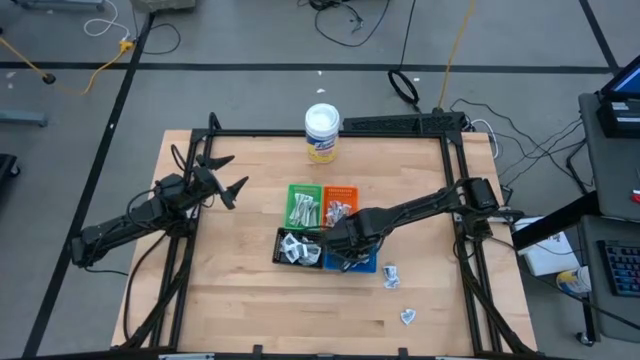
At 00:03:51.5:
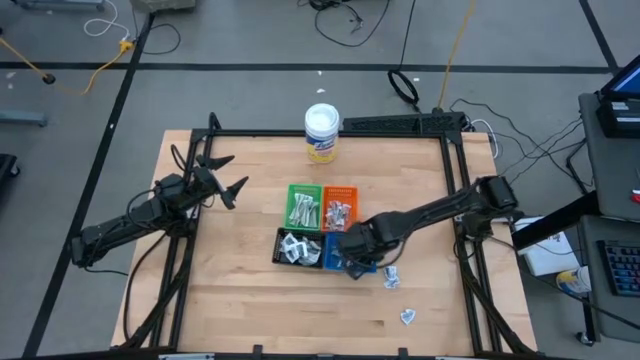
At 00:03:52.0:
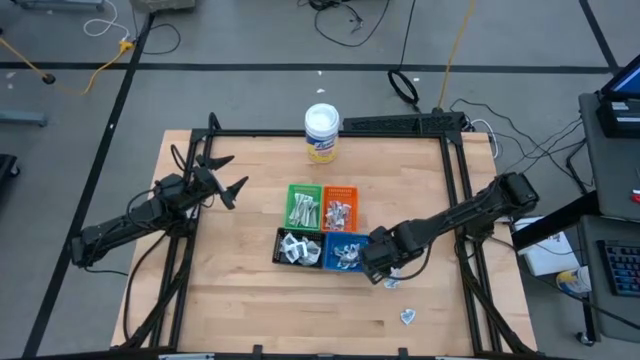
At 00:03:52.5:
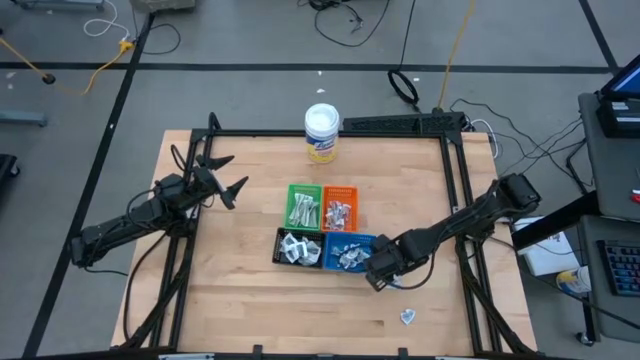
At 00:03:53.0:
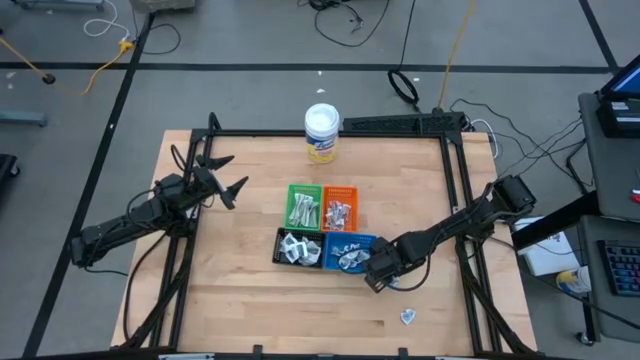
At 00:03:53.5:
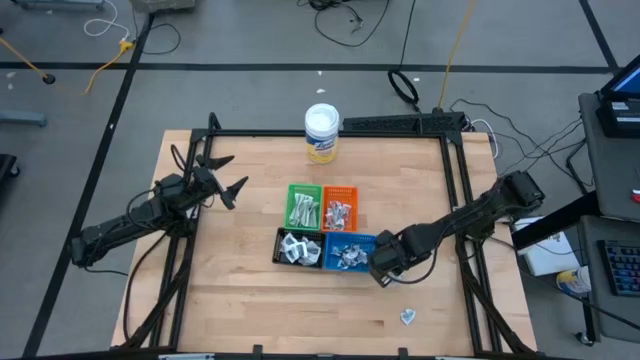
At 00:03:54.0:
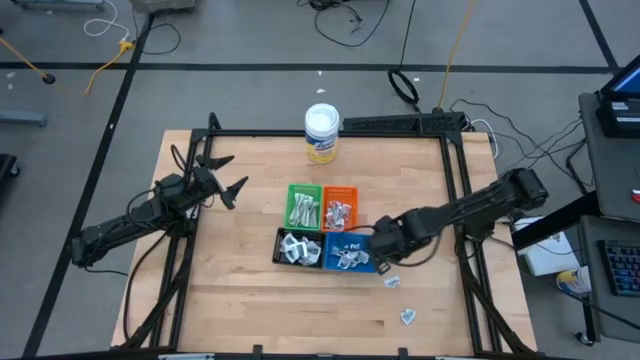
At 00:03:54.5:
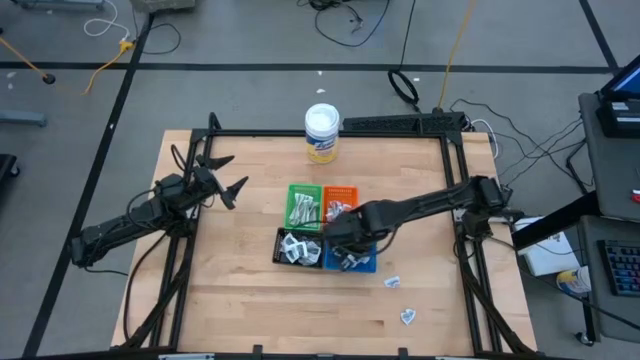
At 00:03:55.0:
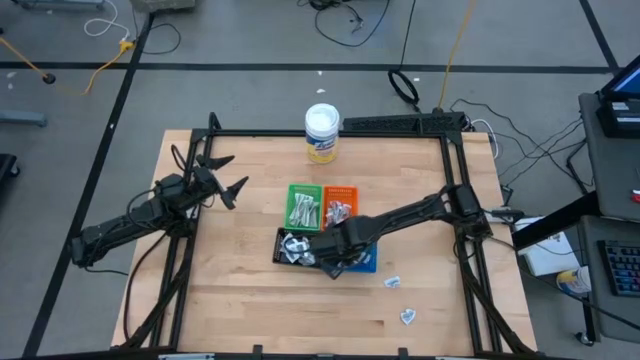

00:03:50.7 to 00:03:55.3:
Task: Pick & Place First Aid Supplies
Put the alcohol pad into the blue bin

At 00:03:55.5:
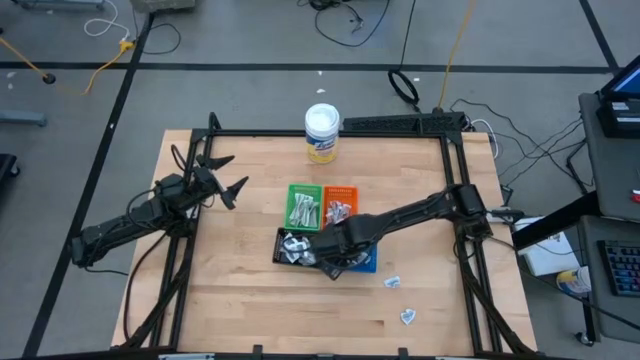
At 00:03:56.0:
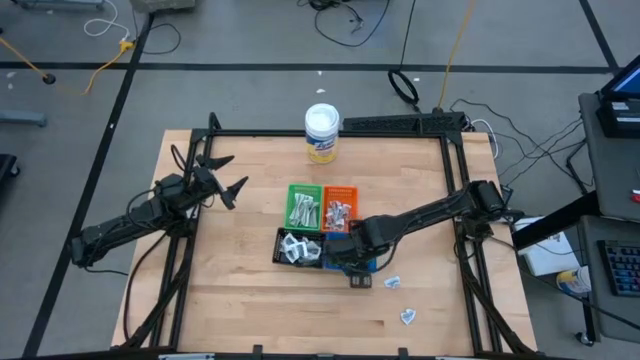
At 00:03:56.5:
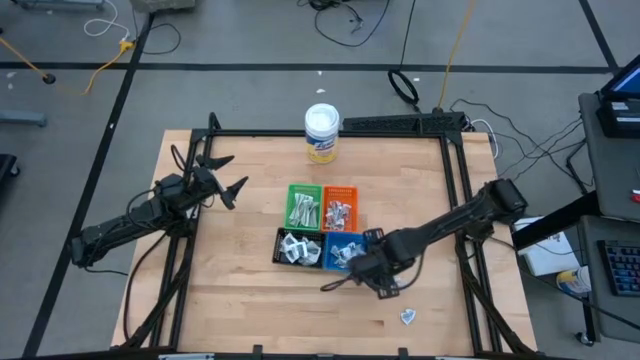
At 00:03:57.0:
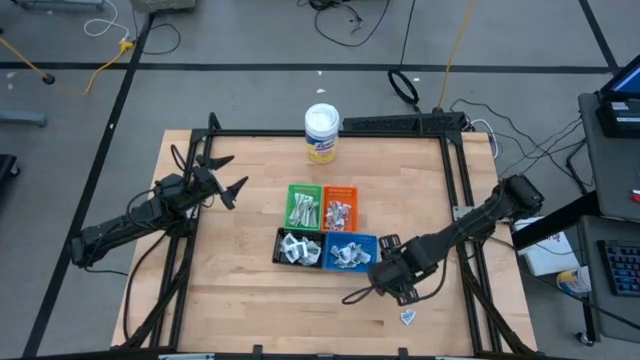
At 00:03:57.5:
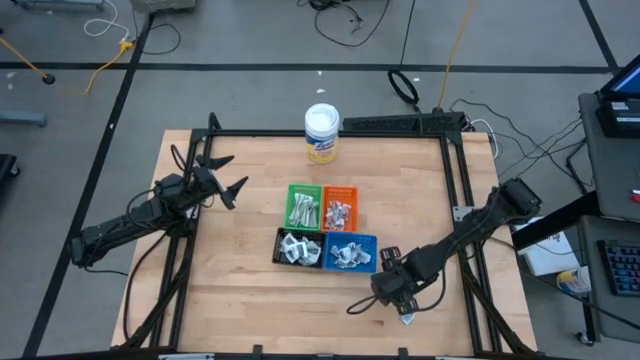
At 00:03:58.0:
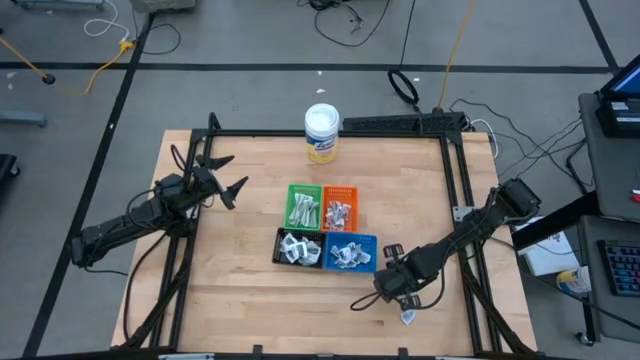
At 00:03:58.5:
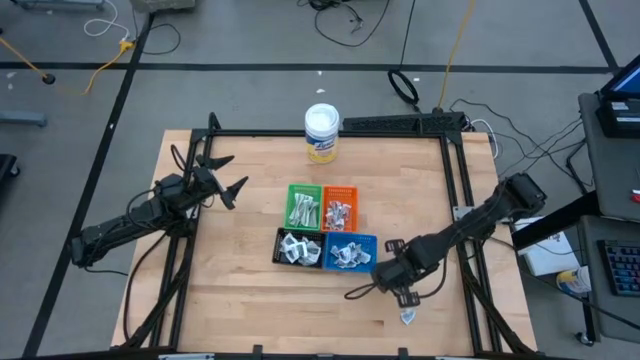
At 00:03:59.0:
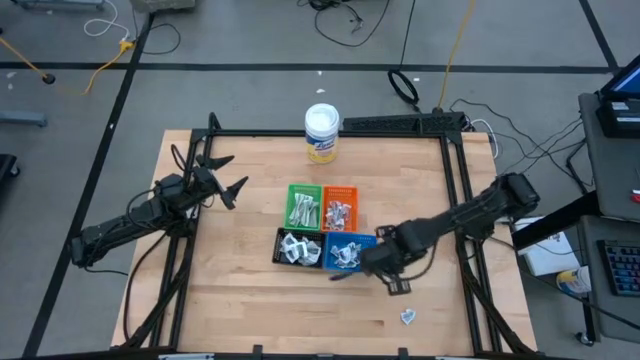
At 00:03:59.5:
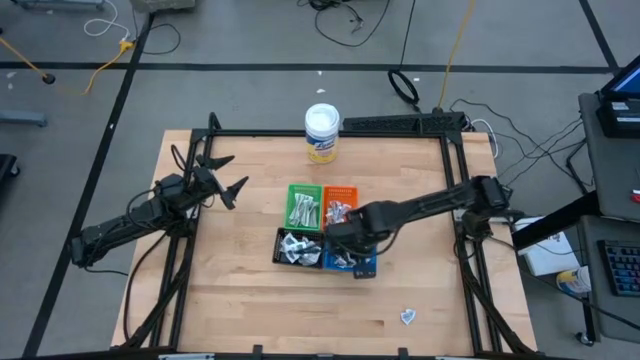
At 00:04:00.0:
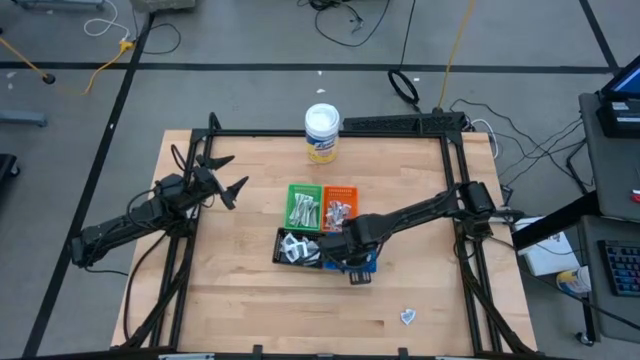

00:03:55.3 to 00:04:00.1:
Put the alcohol pad into the blue bin

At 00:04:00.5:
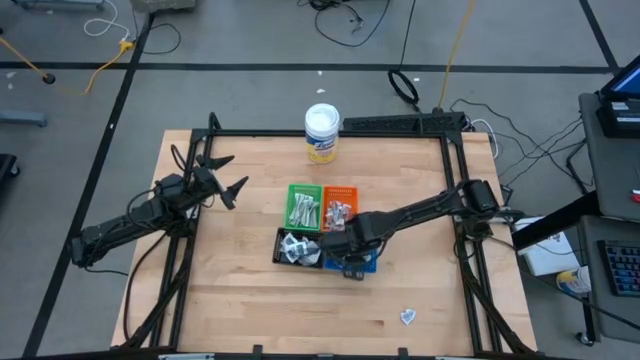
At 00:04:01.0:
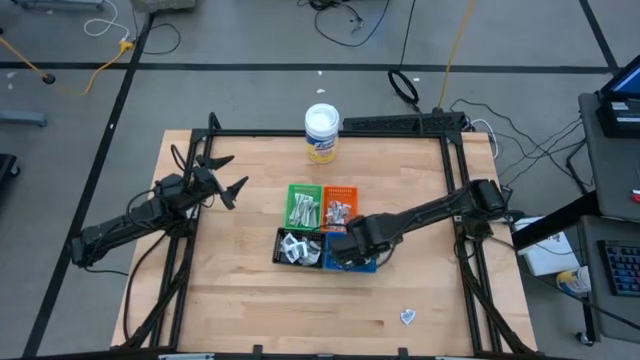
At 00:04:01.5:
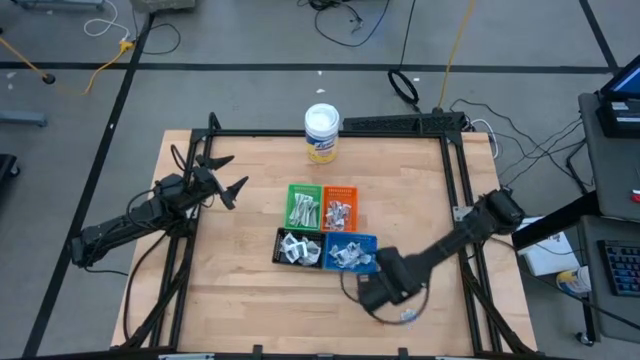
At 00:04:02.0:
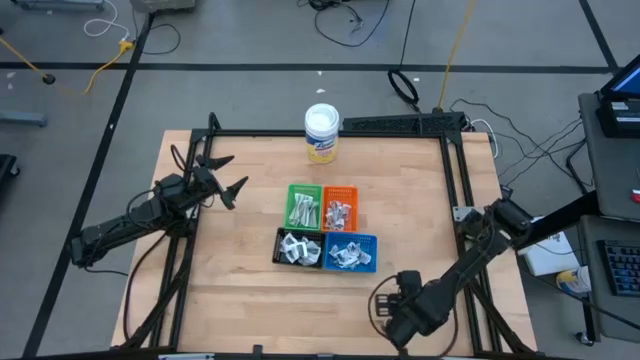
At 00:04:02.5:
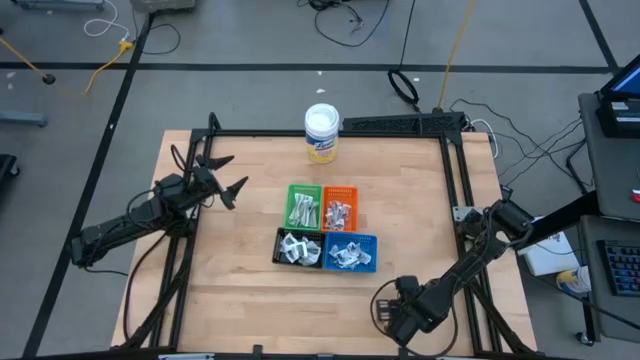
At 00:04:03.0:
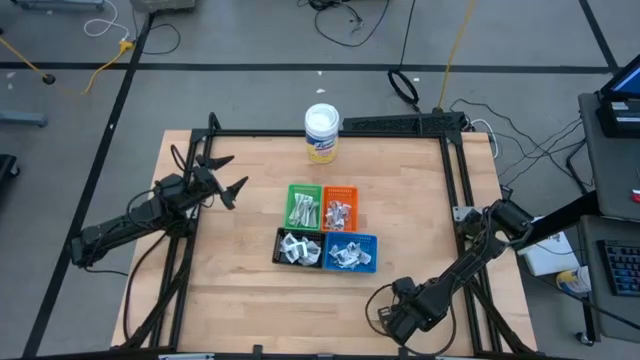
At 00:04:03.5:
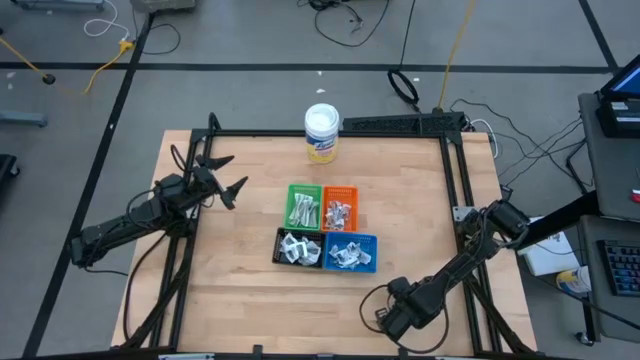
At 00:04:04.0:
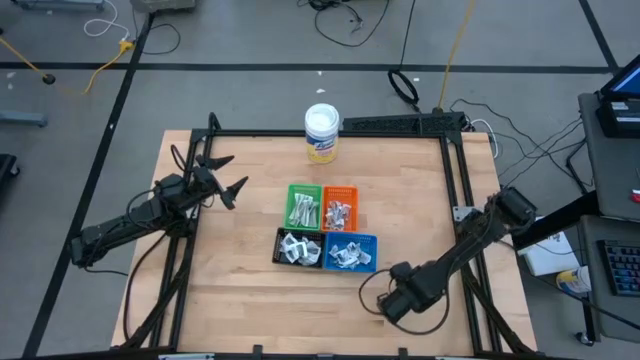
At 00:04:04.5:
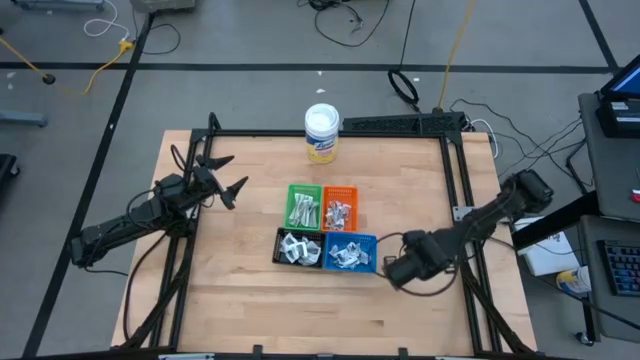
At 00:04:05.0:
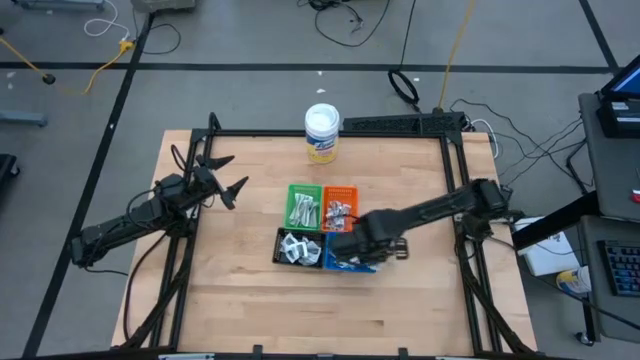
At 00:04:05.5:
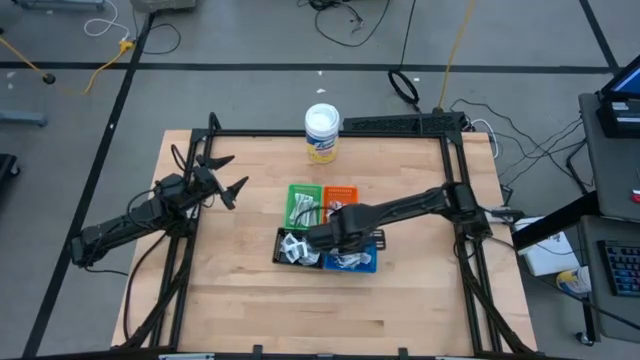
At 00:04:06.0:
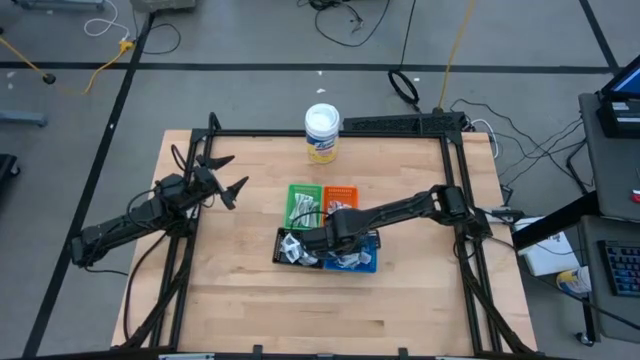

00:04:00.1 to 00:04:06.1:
Put the alcohol pad into the blue bin

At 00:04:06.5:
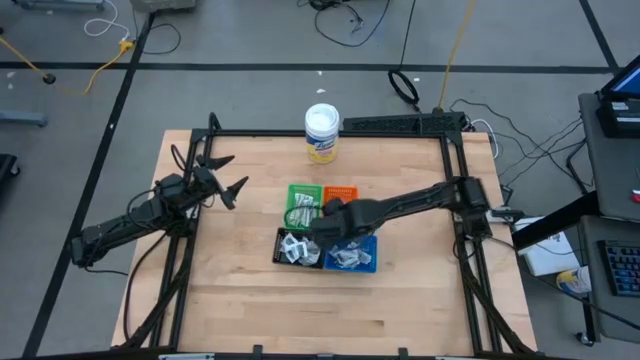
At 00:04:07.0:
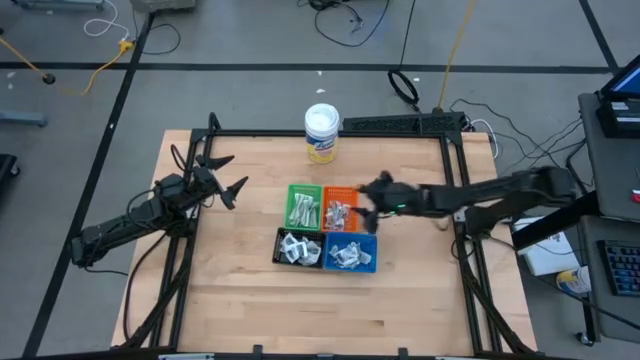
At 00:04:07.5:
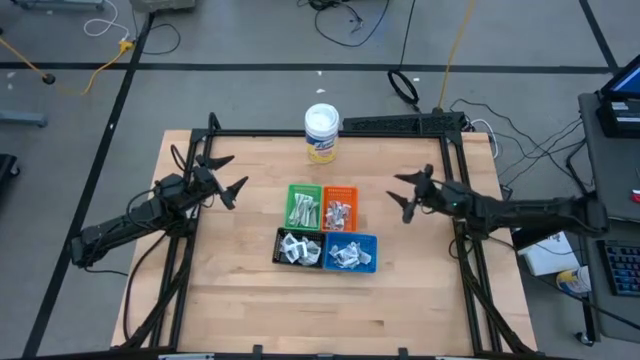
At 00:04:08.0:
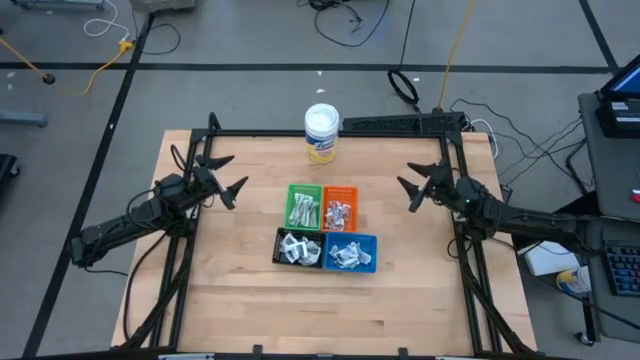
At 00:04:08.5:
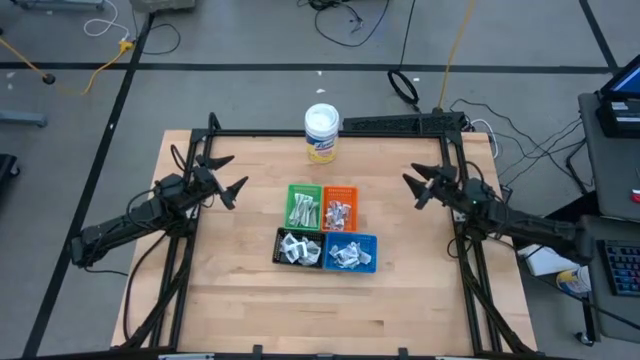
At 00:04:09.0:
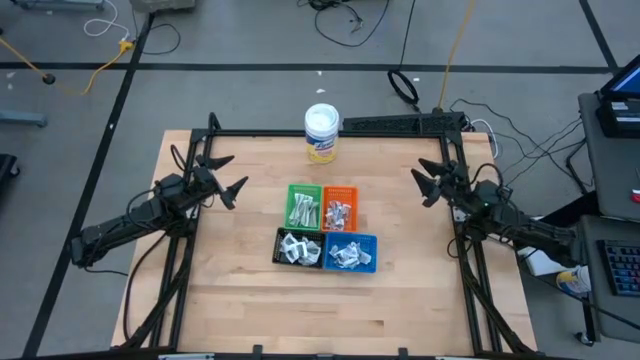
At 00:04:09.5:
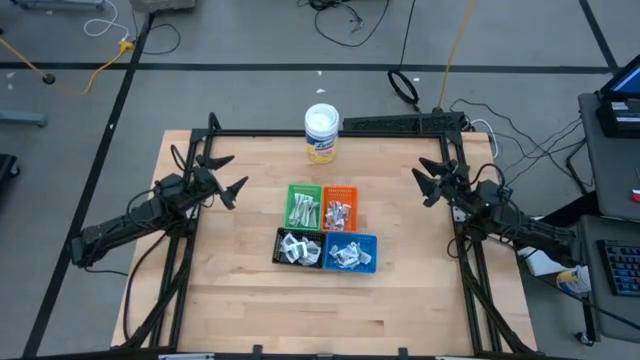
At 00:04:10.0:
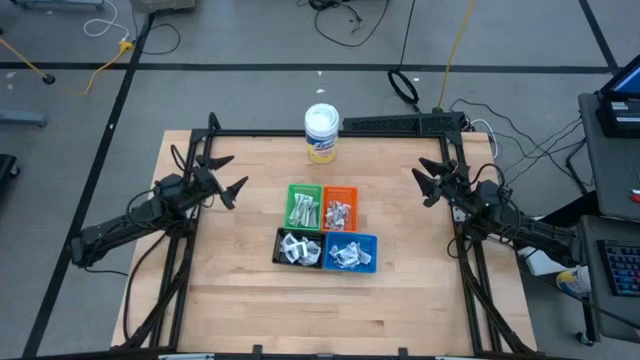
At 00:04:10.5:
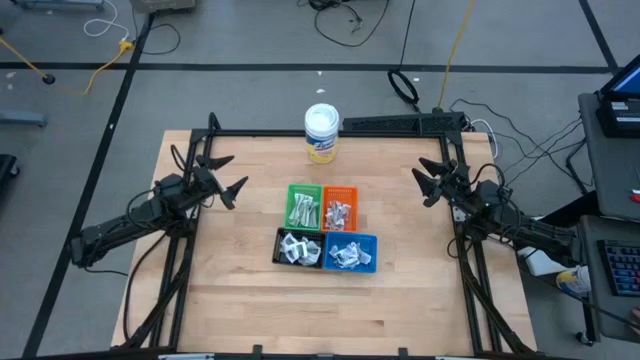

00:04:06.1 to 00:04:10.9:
Return to Home Position
